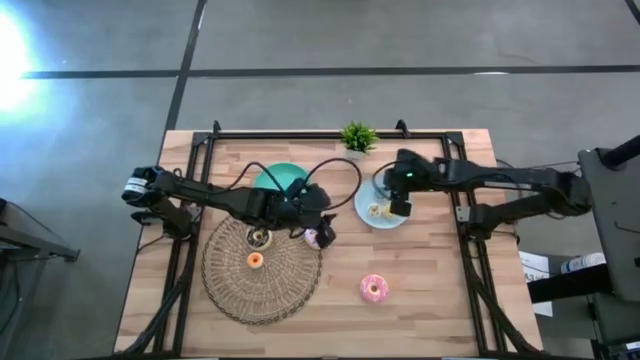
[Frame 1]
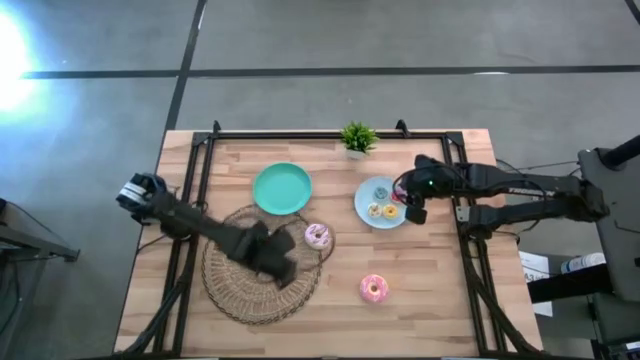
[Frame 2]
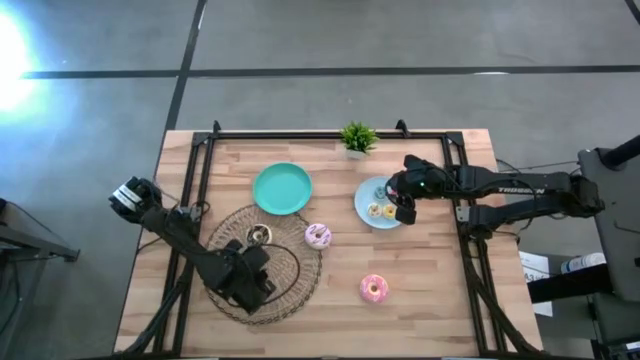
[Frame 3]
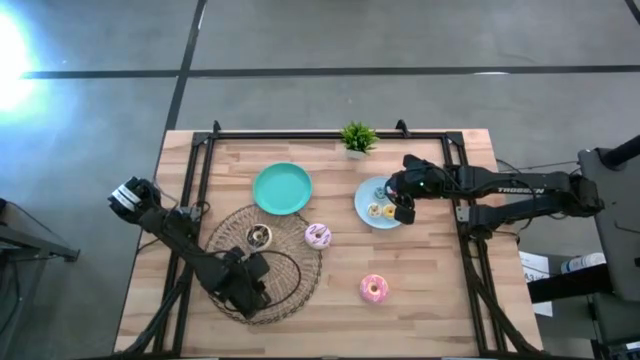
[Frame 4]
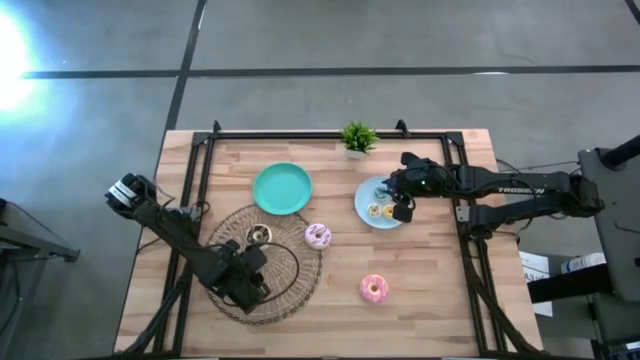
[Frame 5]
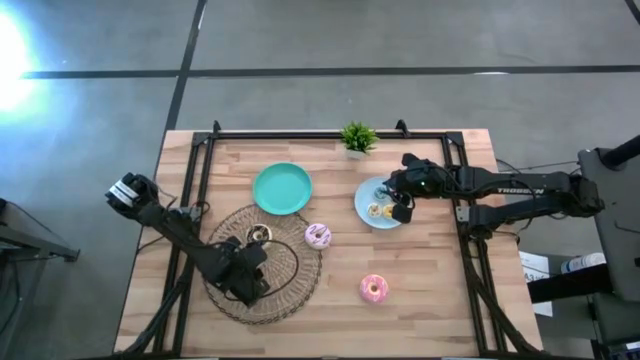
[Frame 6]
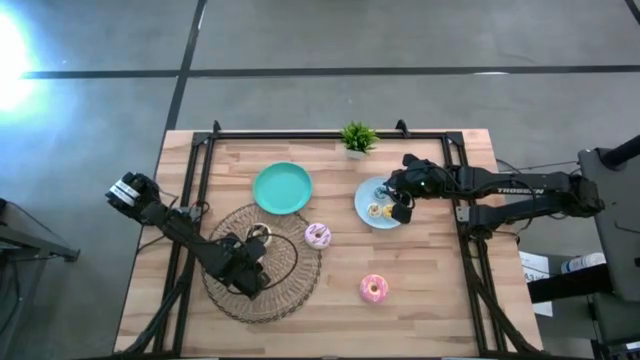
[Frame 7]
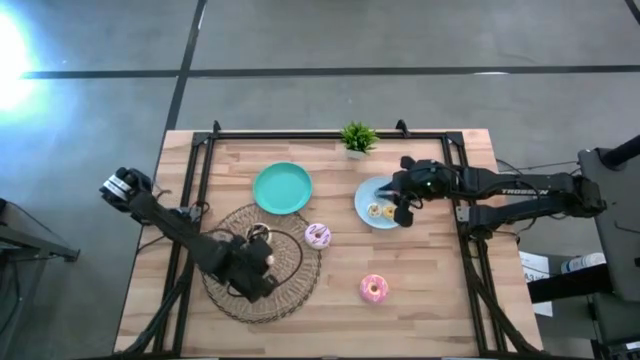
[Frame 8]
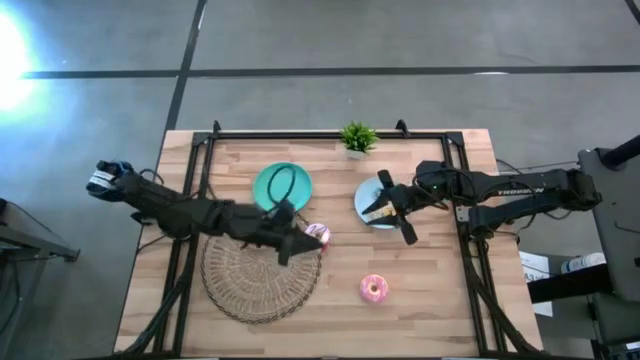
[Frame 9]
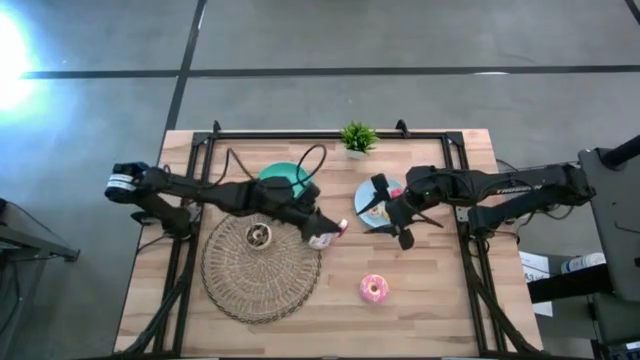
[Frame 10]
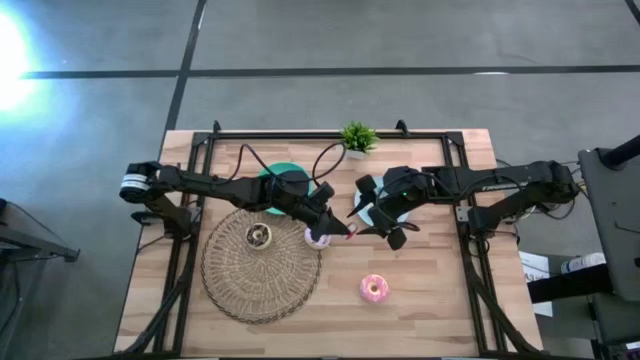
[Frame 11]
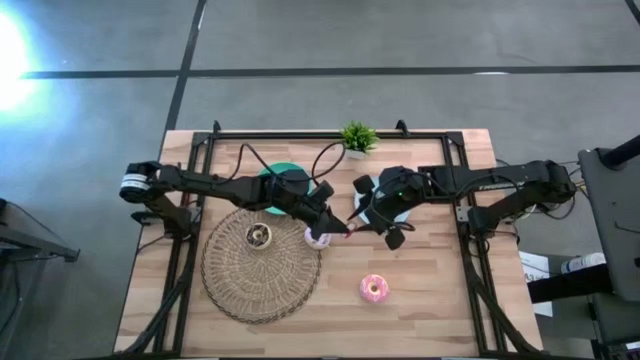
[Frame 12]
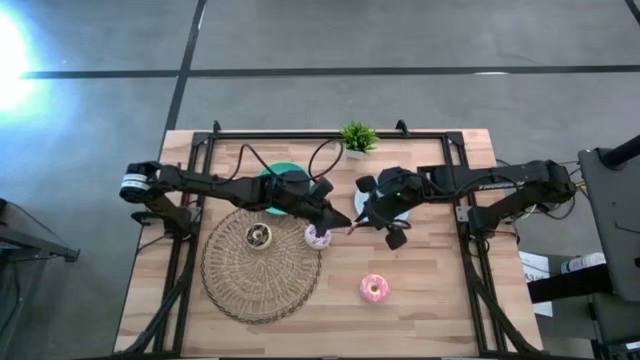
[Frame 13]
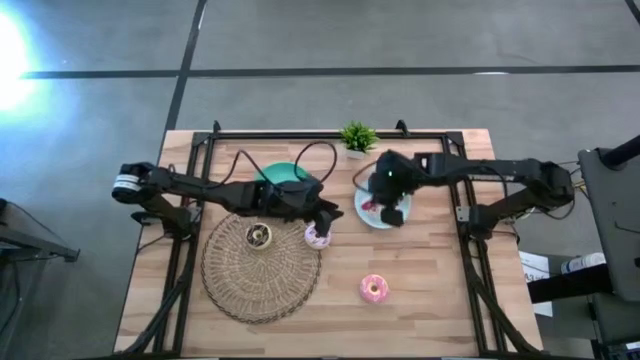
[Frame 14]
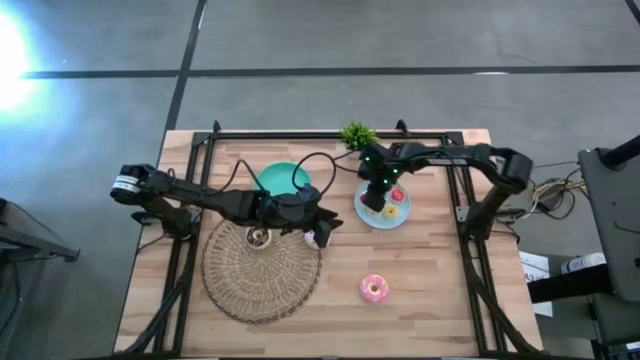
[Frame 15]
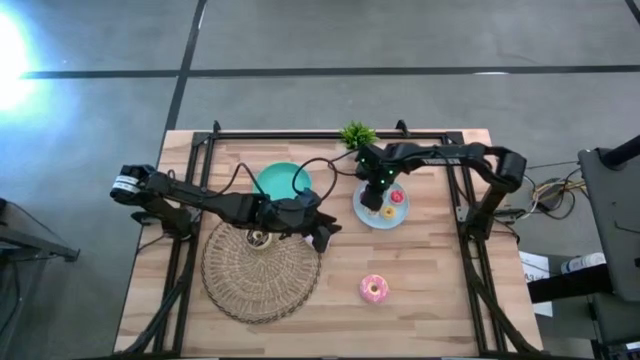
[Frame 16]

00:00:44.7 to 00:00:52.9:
Task: Pick & Place donuts
Put the small red donut into the blue plate

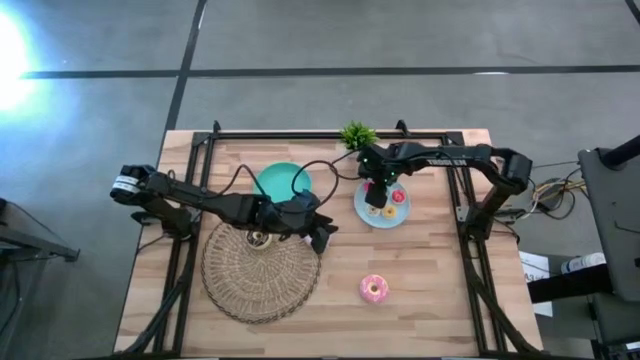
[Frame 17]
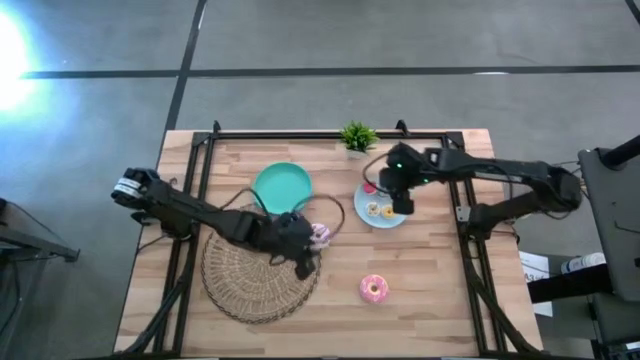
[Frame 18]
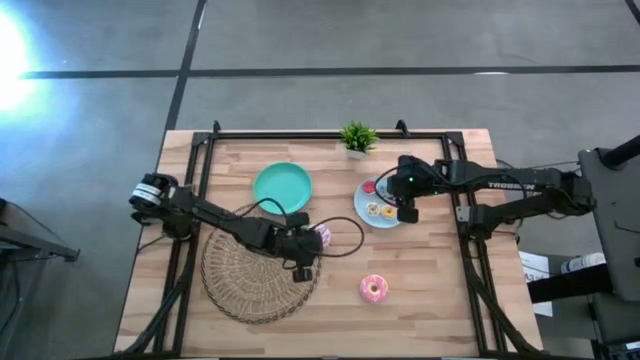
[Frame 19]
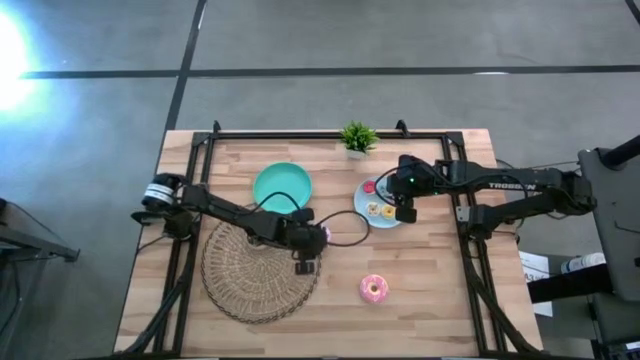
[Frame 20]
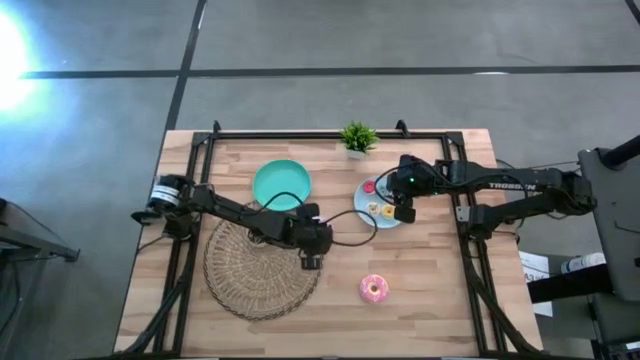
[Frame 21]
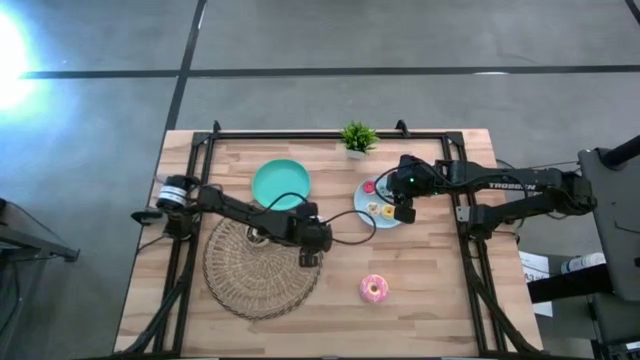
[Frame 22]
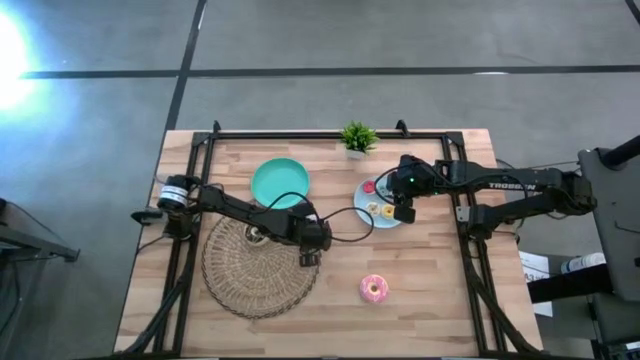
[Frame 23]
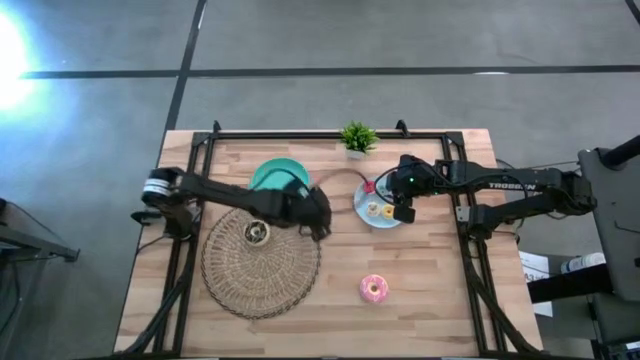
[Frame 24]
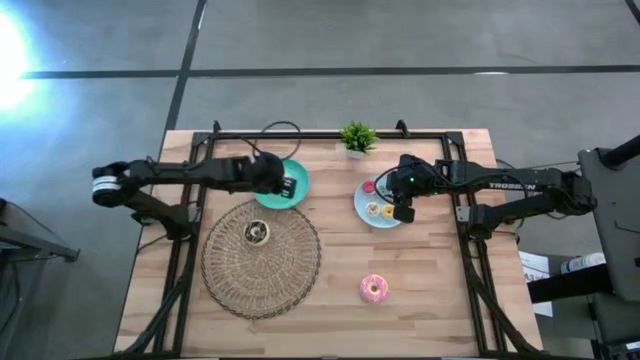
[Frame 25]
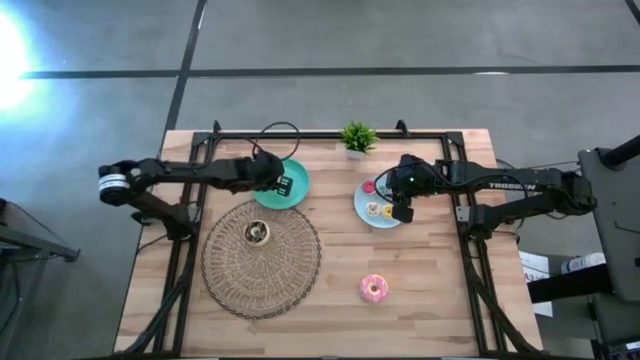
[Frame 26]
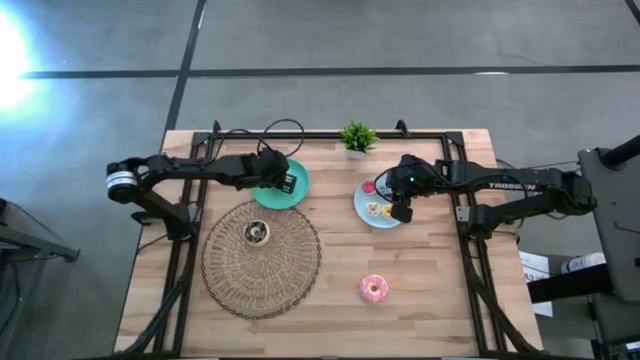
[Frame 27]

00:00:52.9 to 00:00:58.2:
Put the big purple donut into the green plate

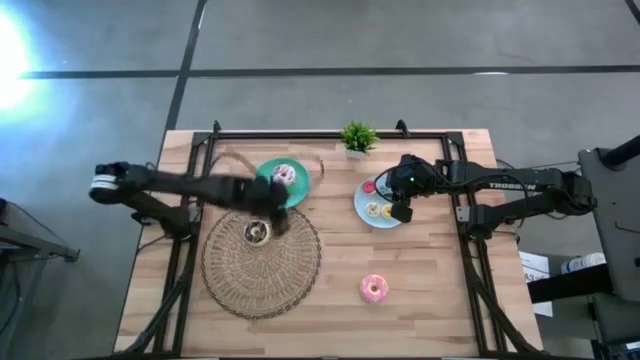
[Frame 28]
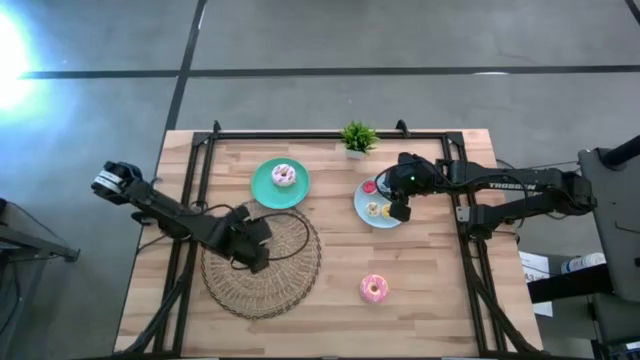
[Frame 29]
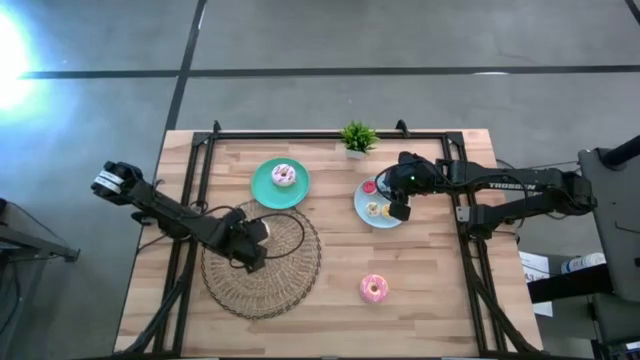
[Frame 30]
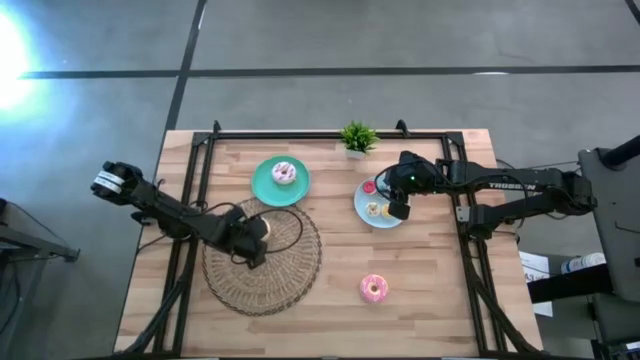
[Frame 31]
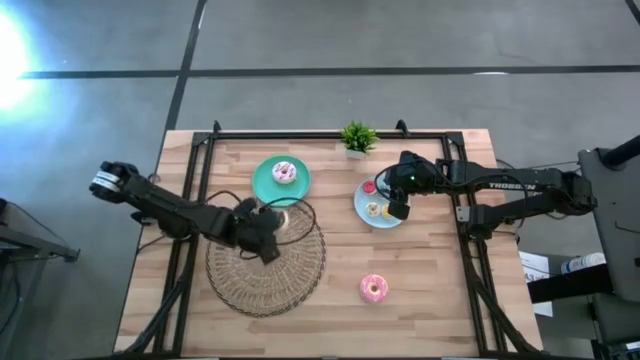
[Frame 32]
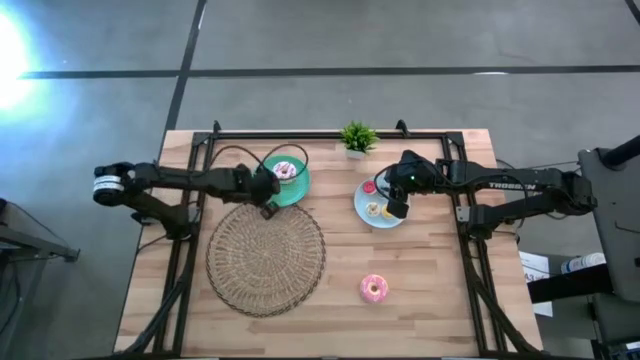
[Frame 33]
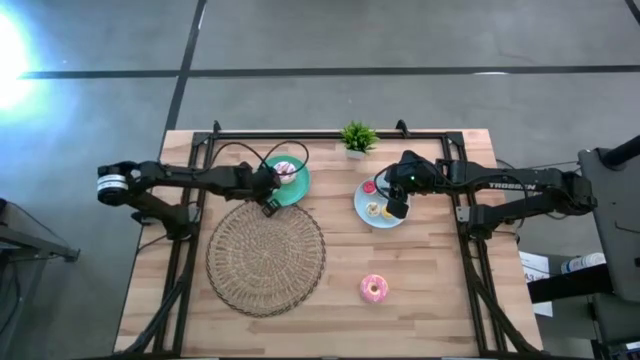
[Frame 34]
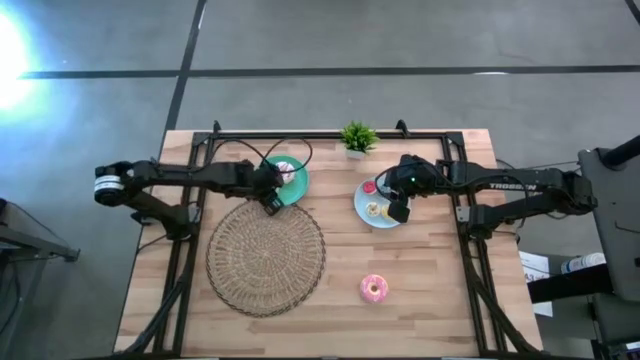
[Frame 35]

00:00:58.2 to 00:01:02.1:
Put the big black donut into the green plate

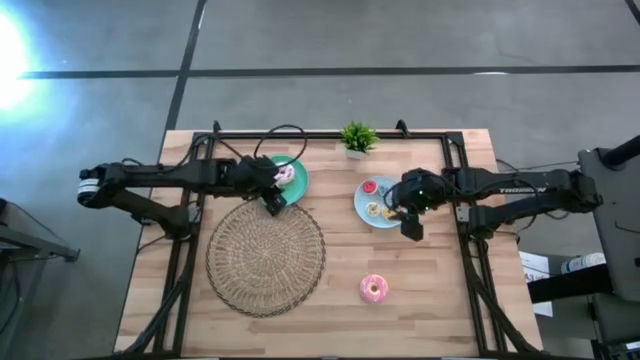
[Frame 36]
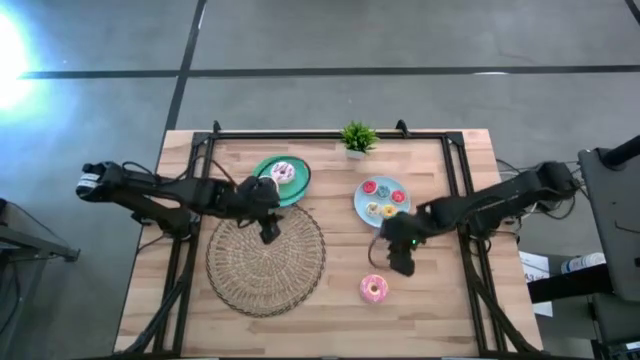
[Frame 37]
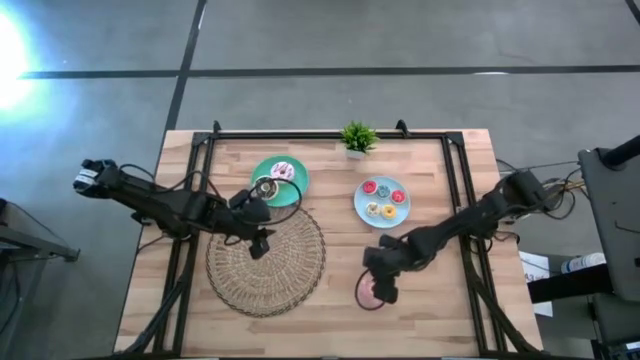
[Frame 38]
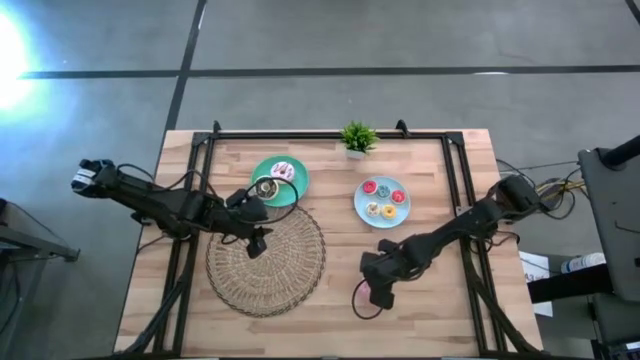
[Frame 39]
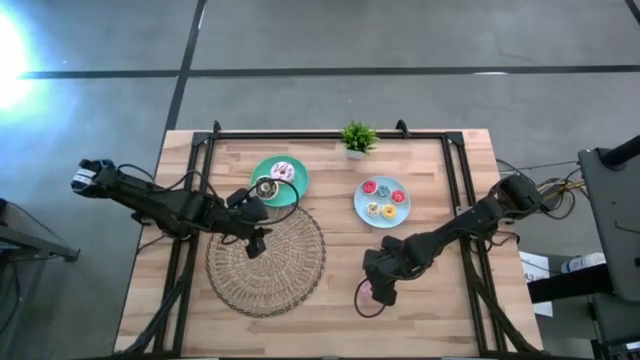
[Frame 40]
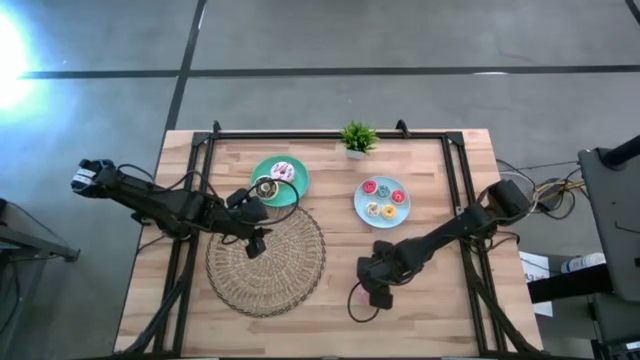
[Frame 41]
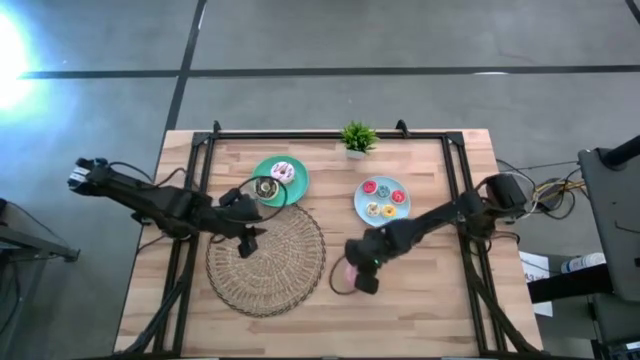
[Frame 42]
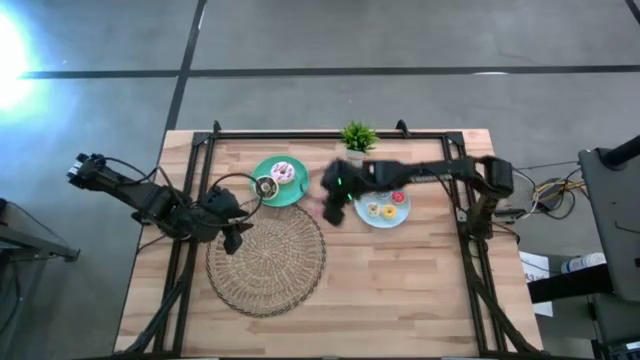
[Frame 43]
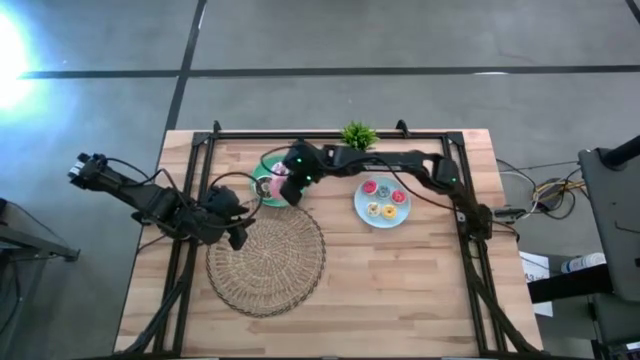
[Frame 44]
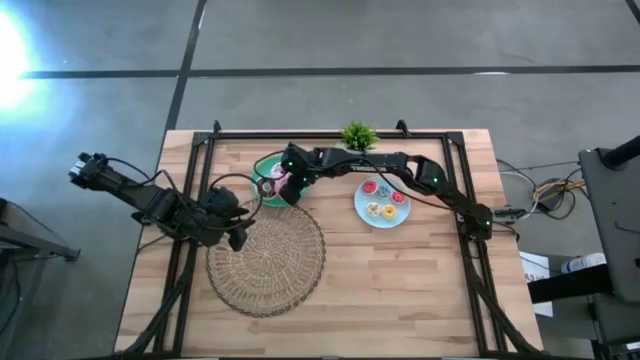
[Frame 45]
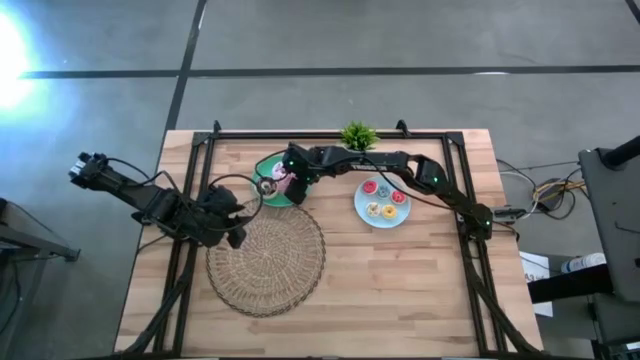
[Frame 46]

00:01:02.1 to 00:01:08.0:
Put the big pink donut into the green plate
